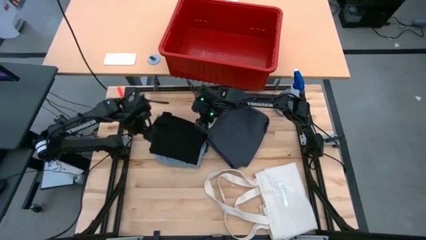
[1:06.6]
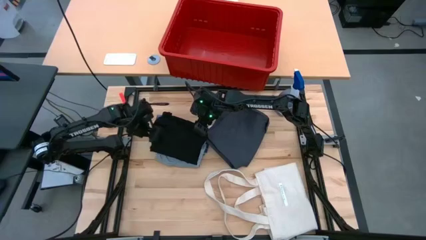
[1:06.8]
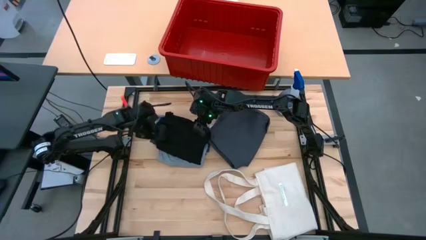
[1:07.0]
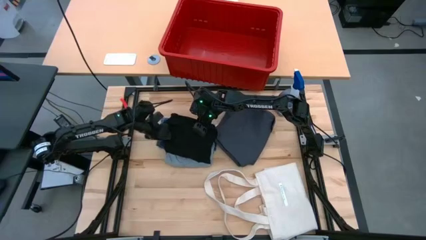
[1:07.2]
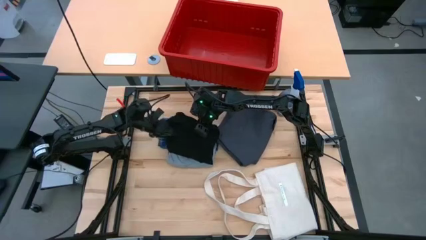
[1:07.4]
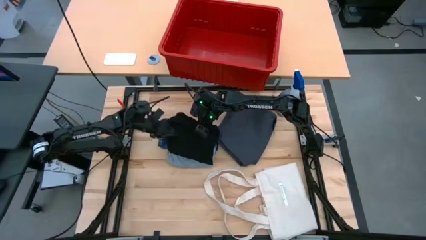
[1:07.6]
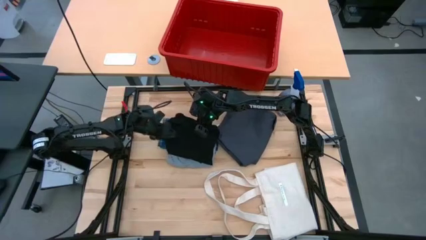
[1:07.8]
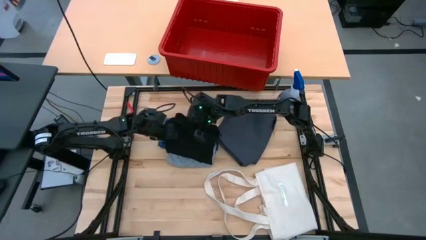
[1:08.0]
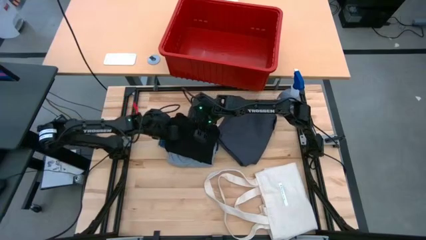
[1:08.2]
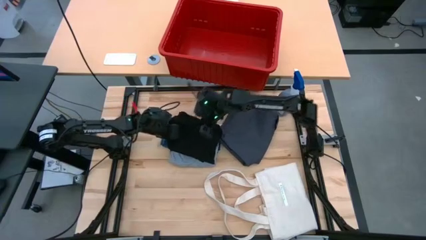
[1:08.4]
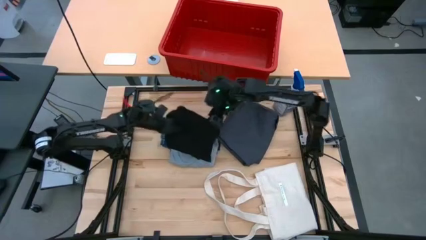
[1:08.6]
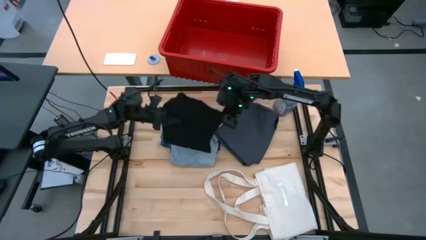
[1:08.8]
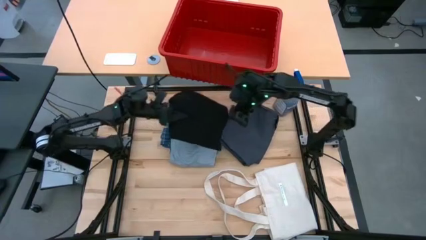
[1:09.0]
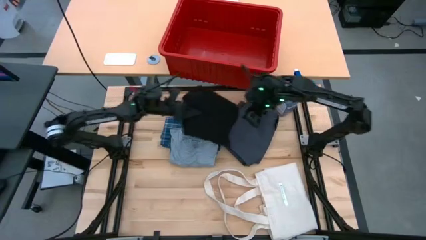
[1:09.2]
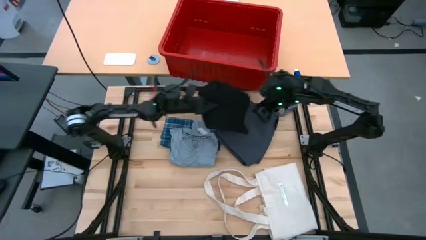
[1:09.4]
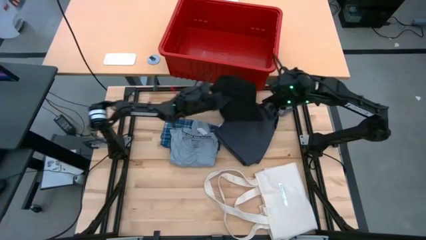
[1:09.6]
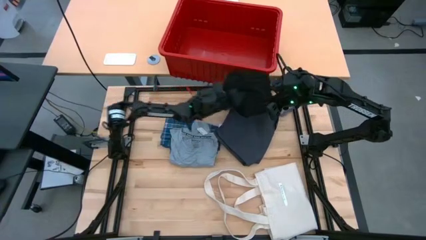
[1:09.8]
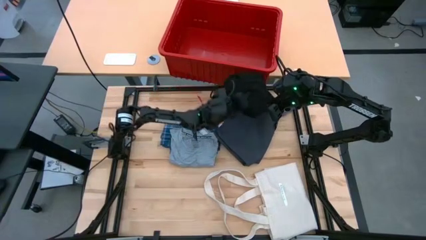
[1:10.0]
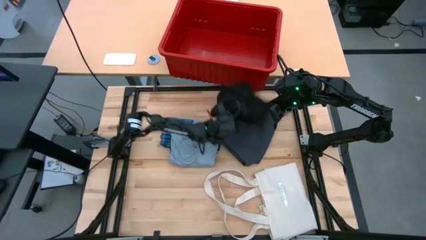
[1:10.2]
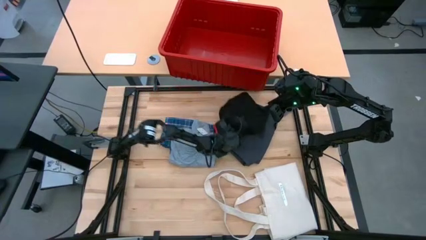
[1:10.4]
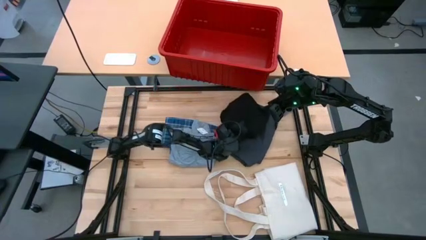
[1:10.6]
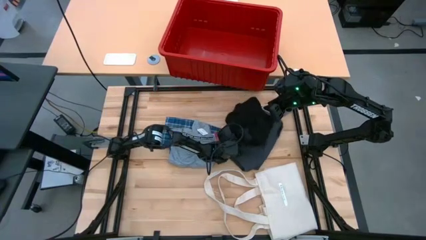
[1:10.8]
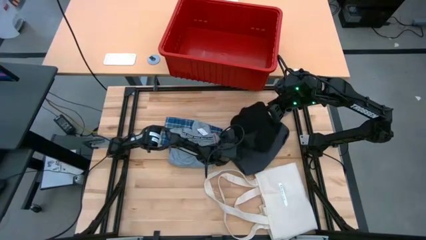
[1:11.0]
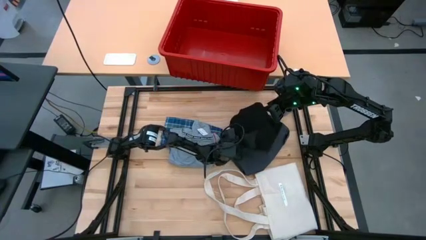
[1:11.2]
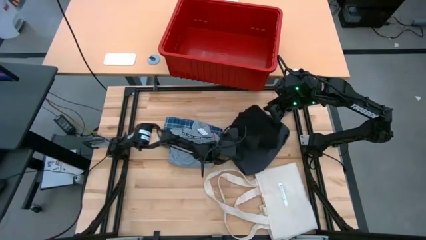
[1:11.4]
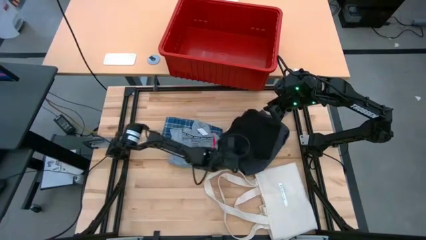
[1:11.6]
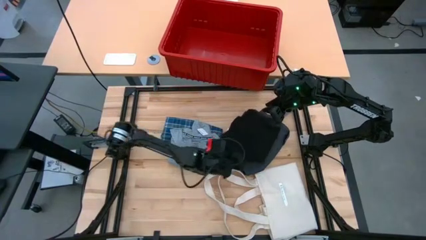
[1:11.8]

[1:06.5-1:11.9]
Task: Fold laundry
Stack the black shirt on top of the dark blue shirt

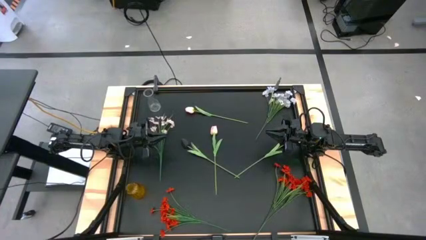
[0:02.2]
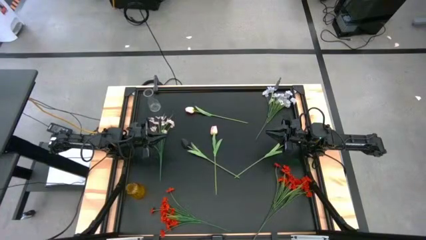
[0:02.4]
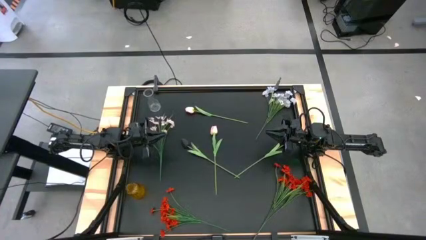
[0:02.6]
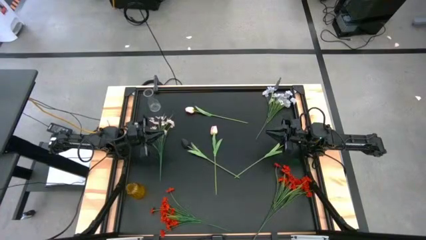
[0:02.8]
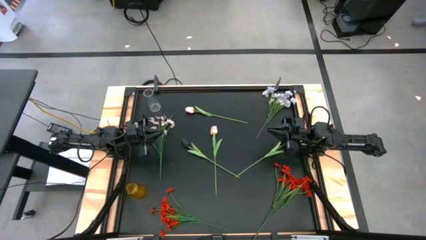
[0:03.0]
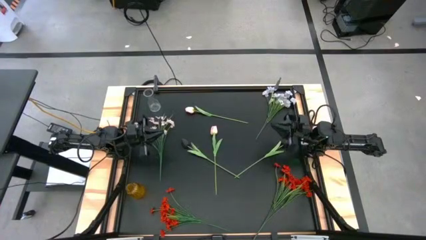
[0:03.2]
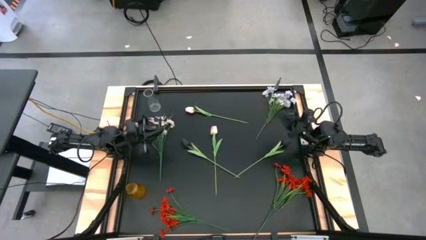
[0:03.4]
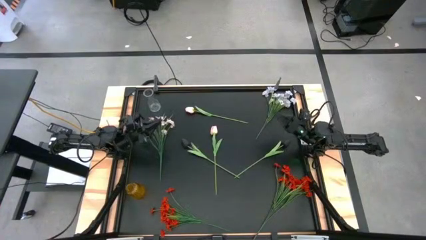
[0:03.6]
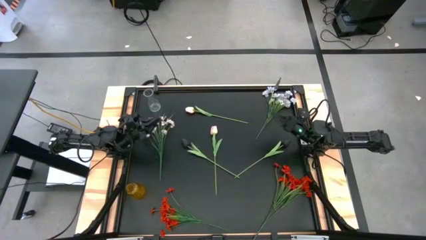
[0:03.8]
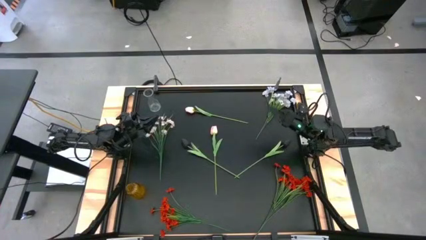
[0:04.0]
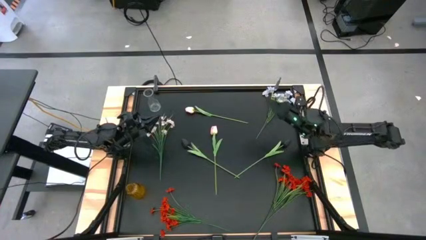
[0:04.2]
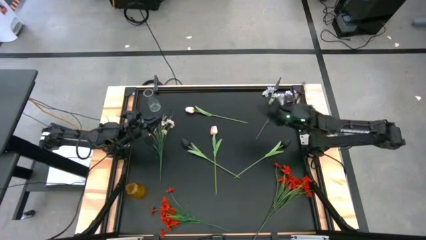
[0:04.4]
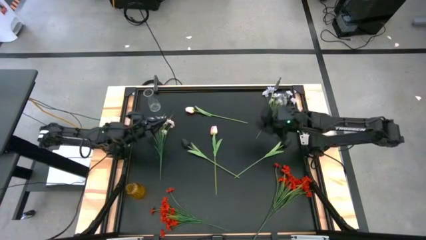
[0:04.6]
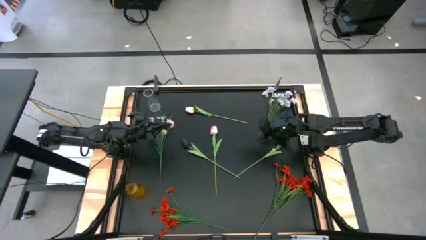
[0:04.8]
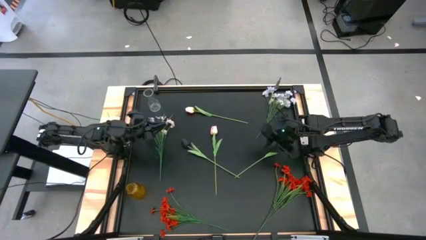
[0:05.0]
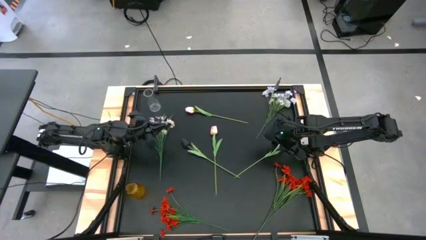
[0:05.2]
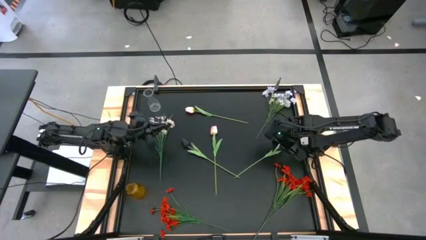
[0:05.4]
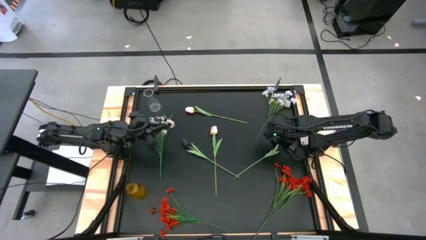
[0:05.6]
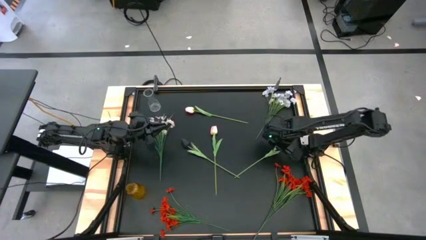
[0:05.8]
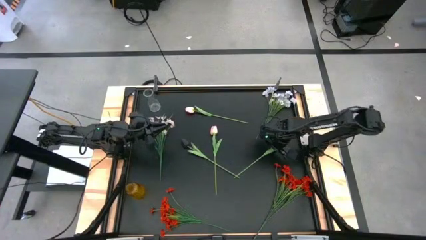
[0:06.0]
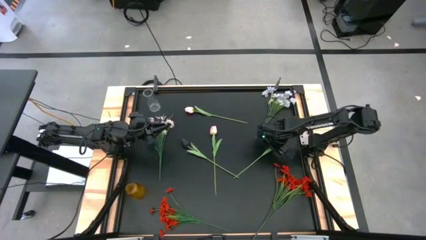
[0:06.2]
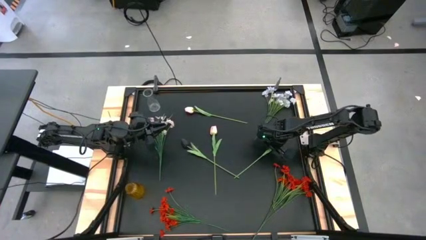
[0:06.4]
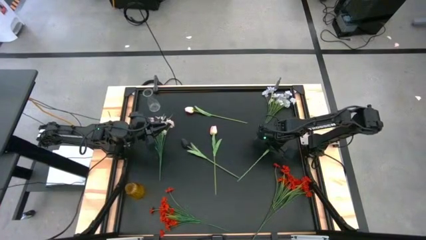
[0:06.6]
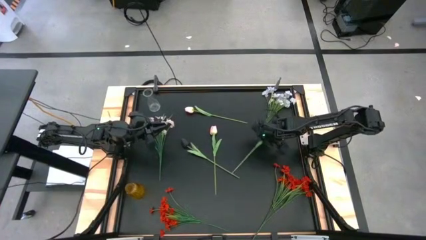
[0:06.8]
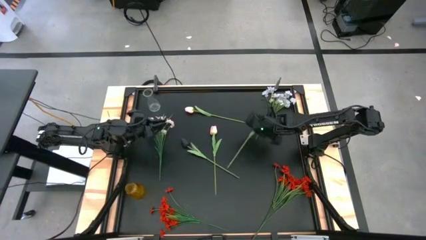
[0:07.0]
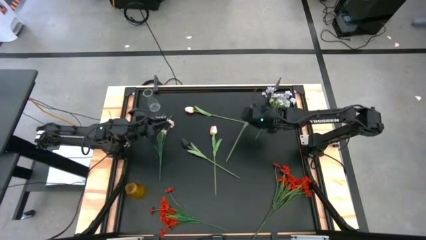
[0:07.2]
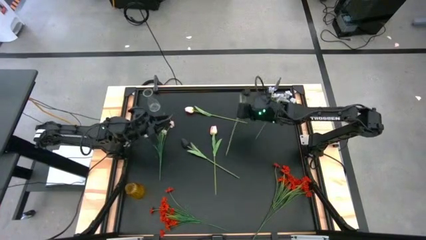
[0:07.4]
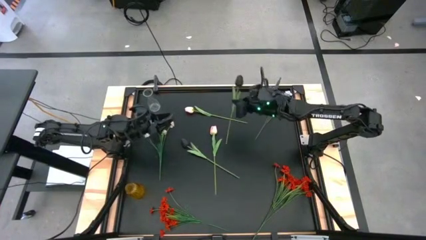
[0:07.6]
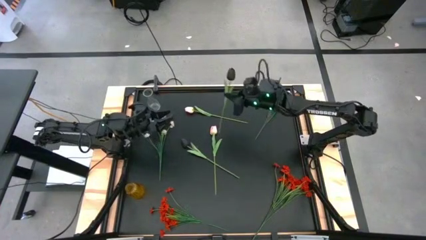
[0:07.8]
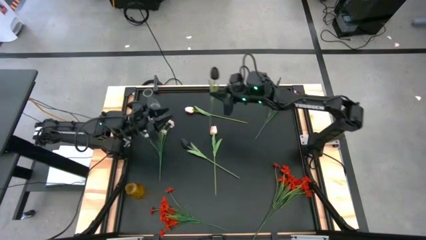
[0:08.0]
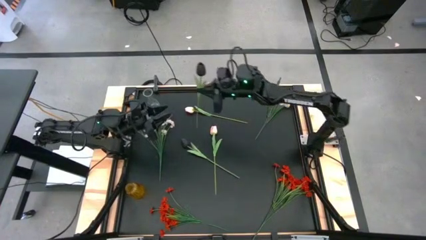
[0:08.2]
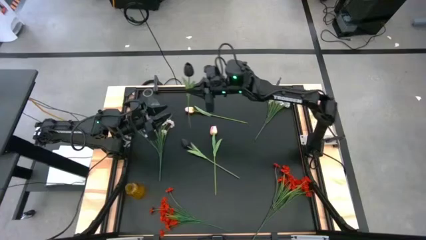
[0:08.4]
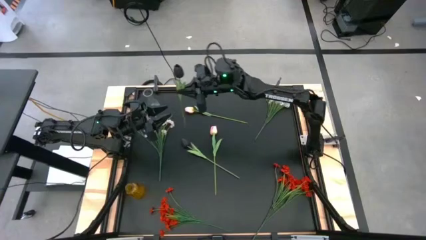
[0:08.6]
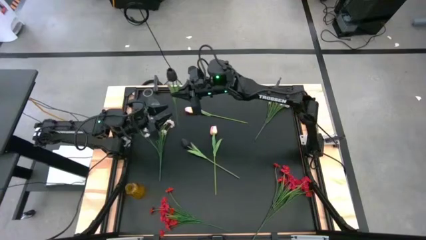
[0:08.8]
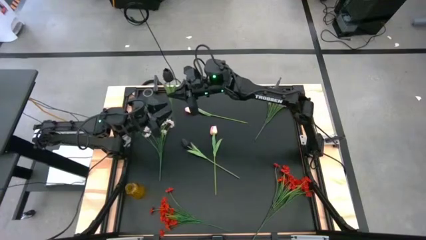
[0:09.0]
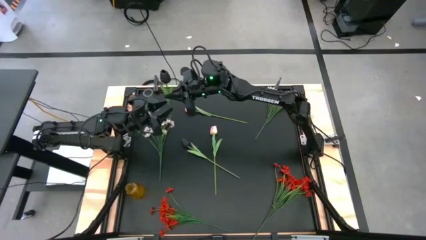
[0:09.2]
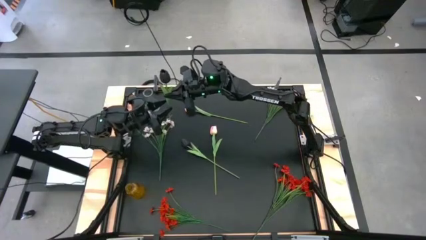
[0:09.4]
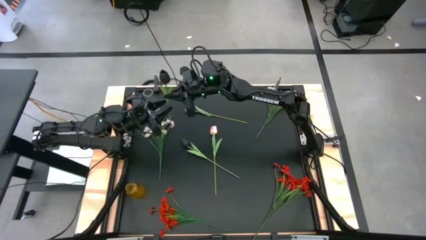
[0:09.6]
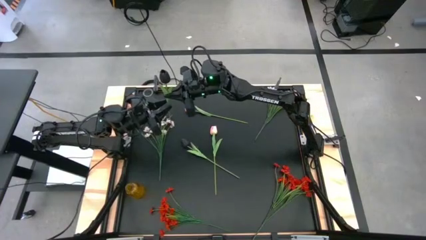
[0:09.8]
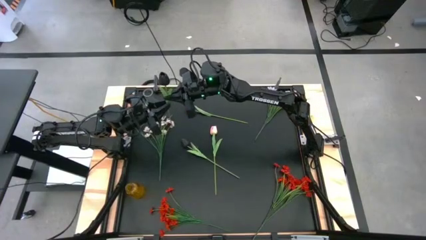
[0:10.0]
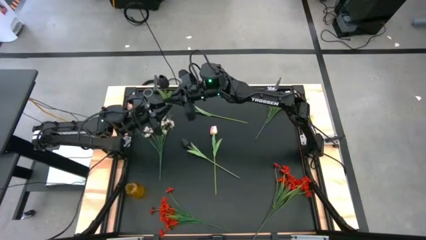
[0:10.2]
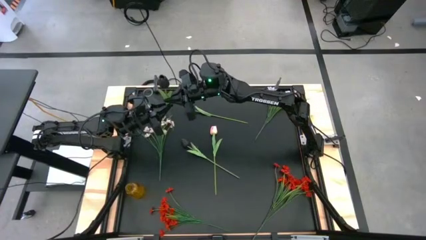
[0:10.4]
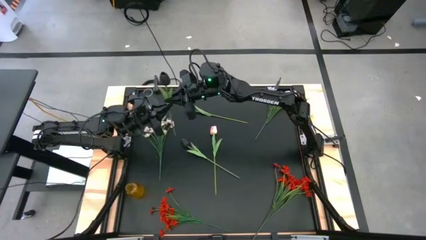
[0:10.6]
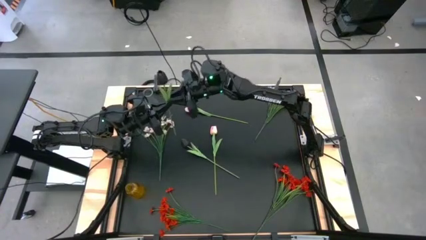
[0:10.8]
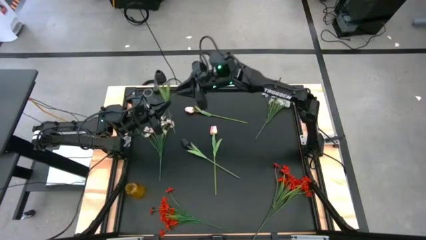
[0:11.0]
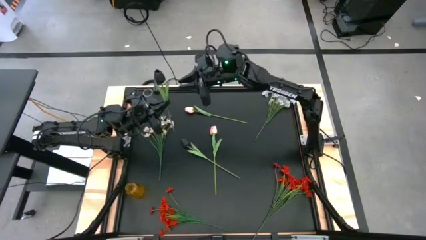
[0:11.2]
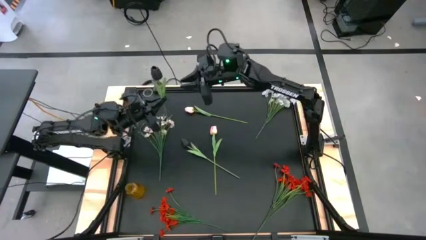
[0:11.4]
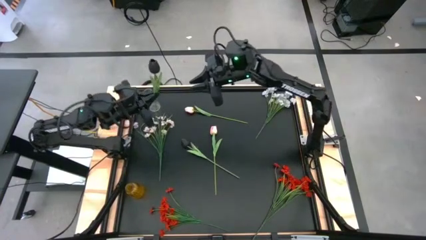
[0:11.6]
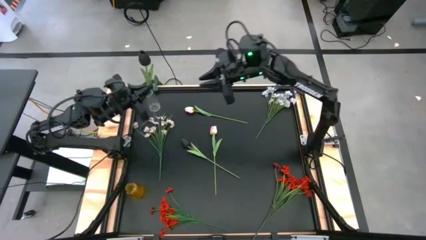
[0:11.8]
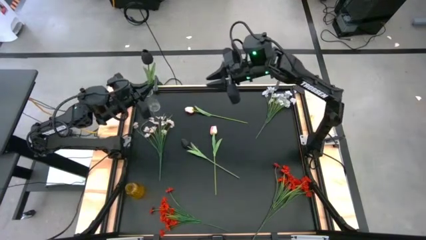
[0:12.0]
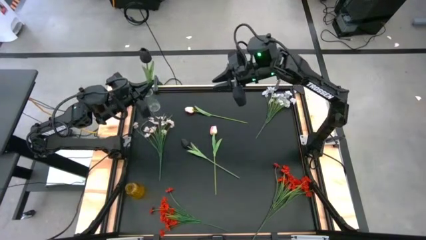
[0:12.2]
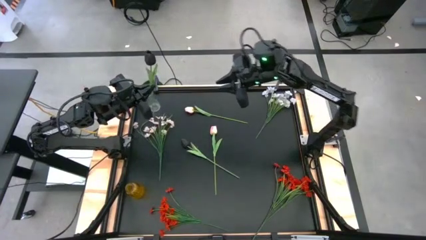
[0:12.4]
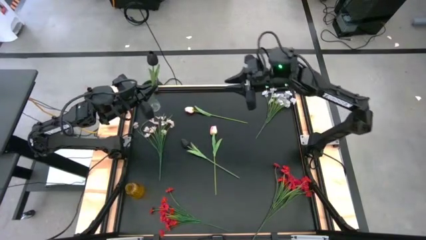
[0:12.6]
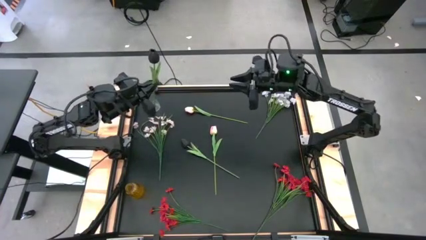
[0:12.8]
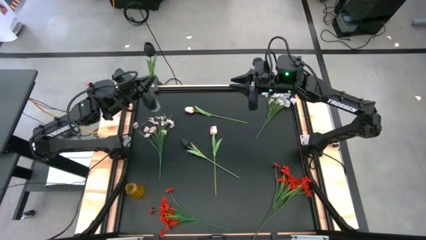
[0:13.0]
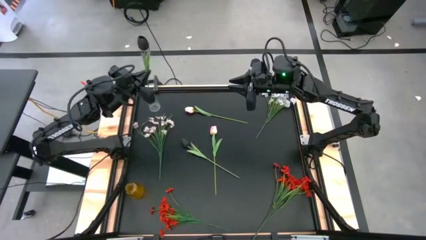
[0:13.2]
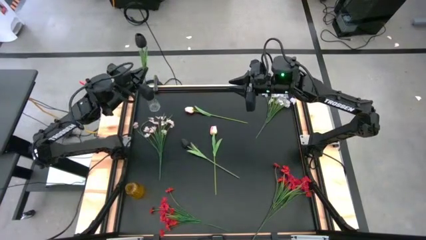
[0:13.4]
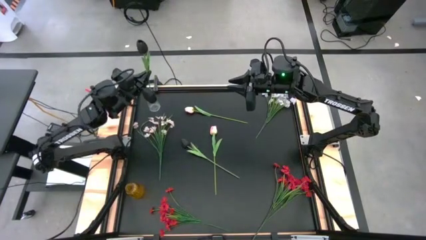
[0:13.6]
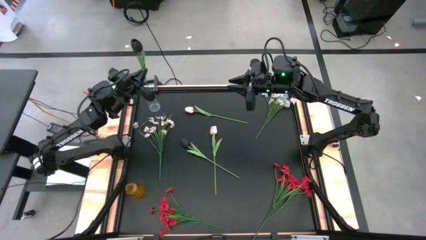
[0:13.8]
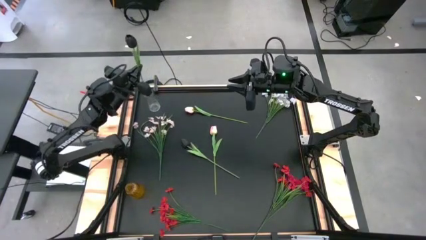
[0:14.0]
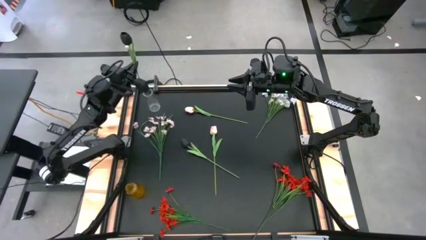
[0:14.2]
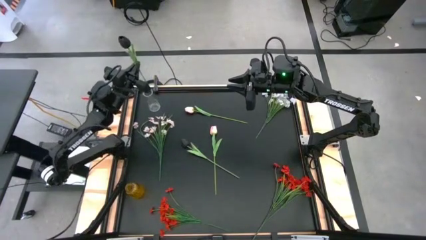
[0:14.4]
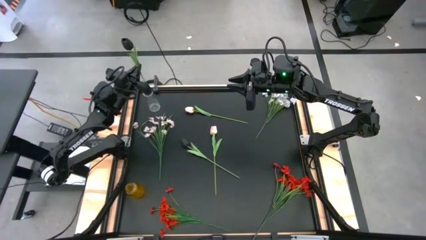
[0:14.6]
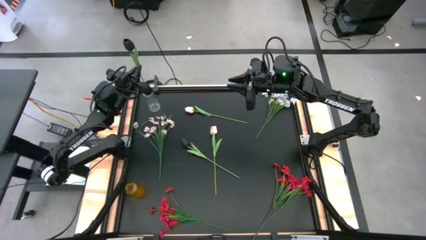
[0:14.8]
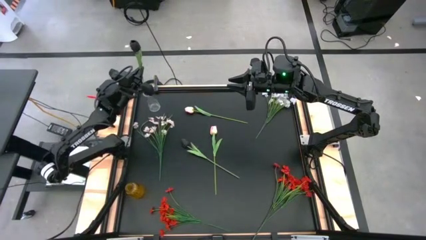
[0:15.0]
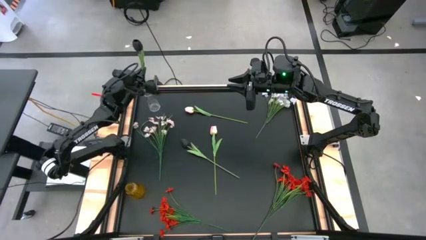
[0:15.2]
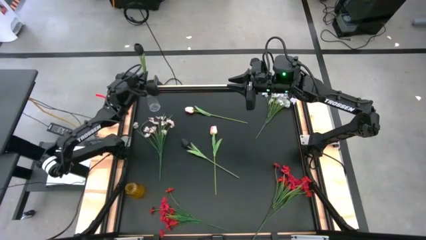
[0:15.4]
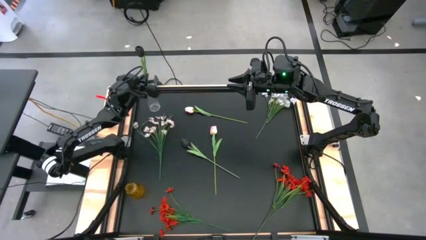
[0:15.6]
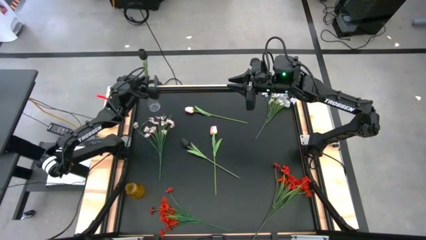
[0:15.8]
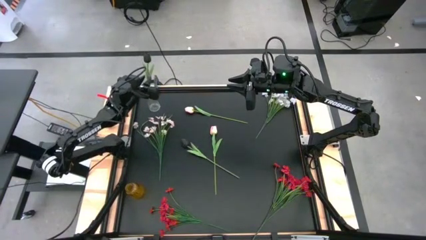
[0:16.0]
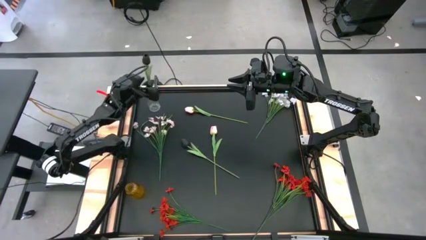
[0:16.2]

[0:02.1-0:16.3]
Task: Sort flowers into vase by color
Put the black flower into the transparent vase
